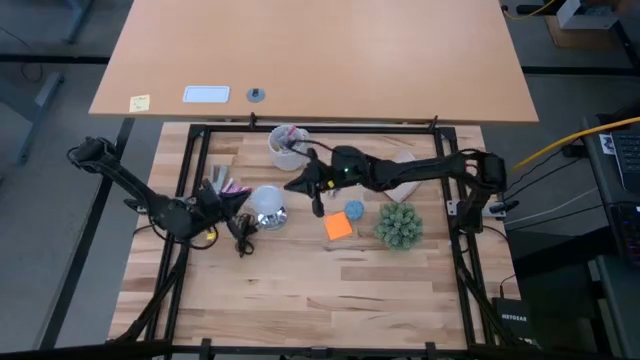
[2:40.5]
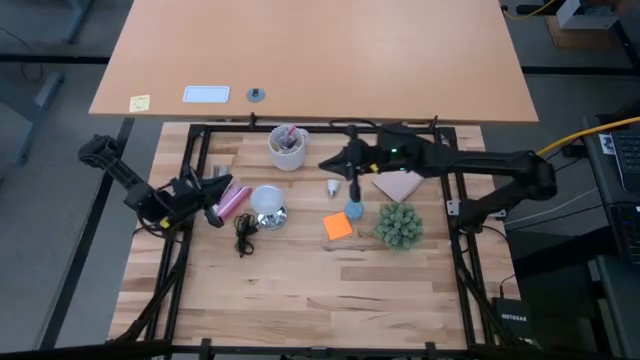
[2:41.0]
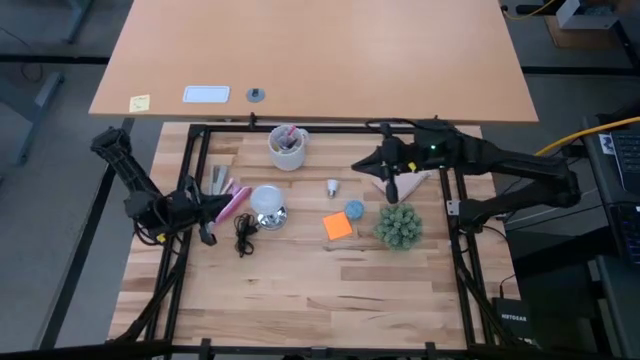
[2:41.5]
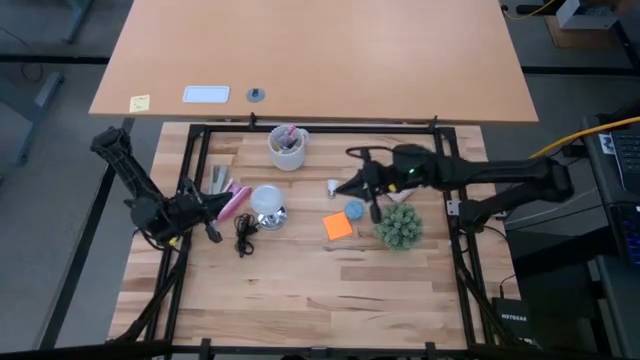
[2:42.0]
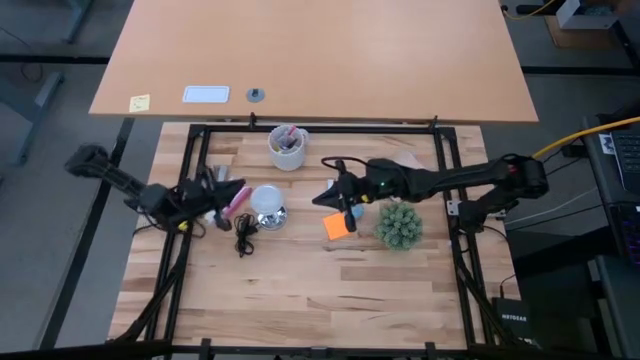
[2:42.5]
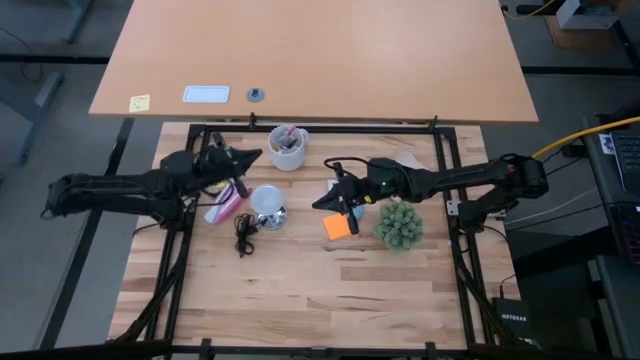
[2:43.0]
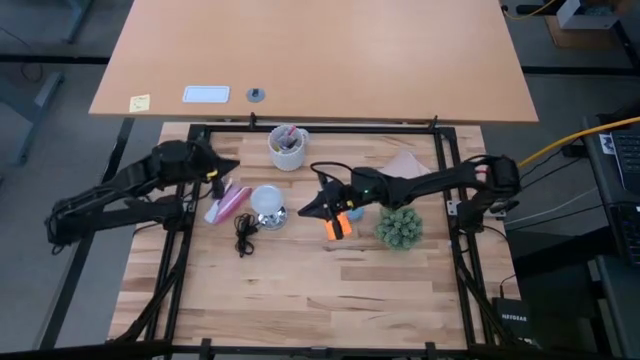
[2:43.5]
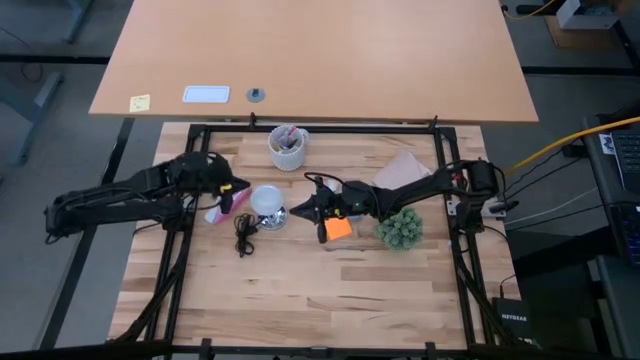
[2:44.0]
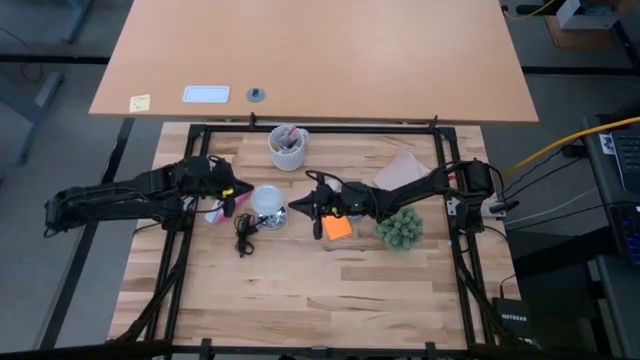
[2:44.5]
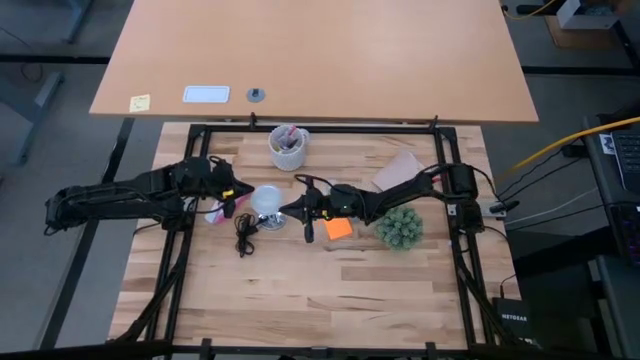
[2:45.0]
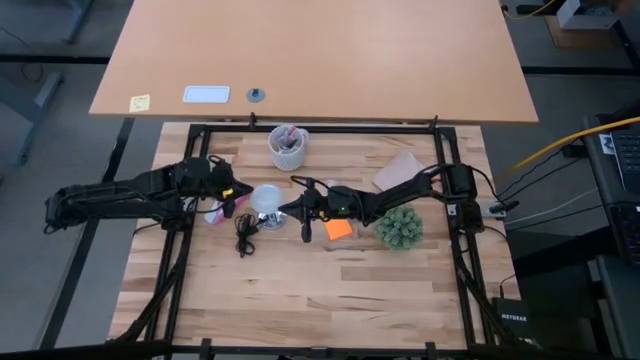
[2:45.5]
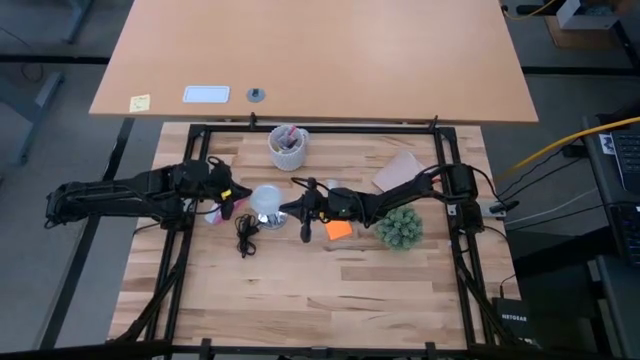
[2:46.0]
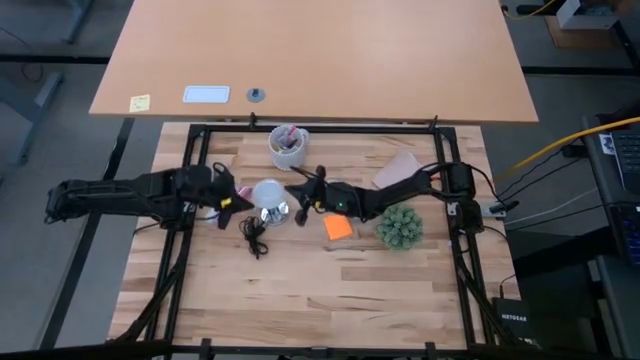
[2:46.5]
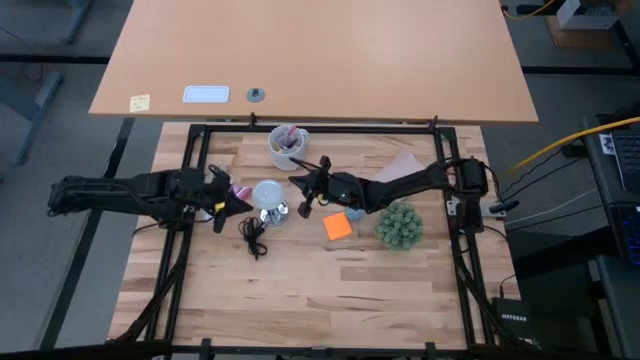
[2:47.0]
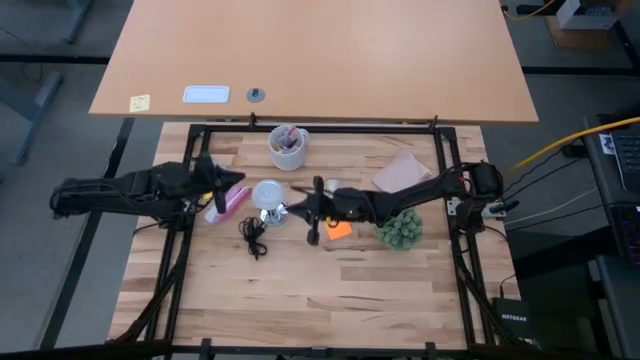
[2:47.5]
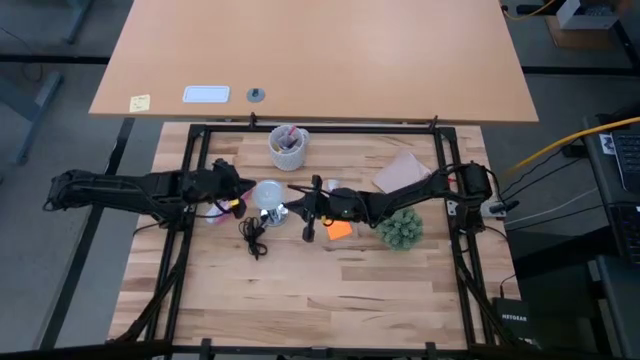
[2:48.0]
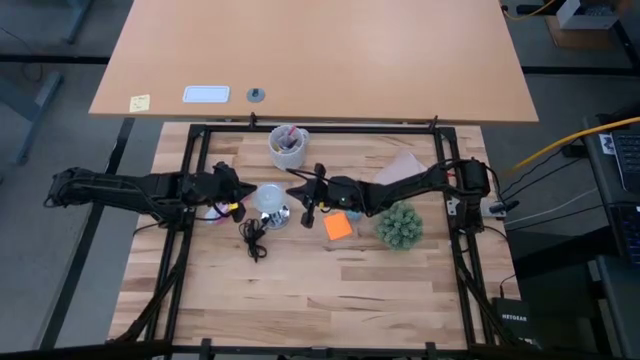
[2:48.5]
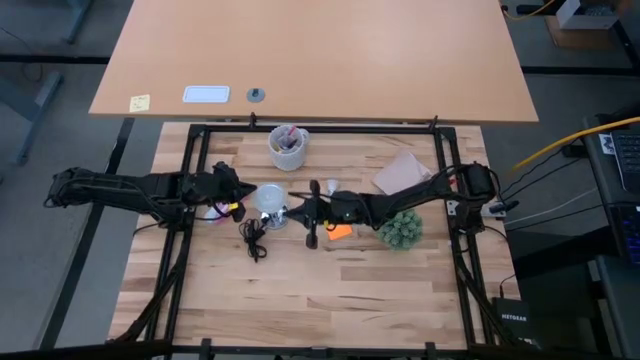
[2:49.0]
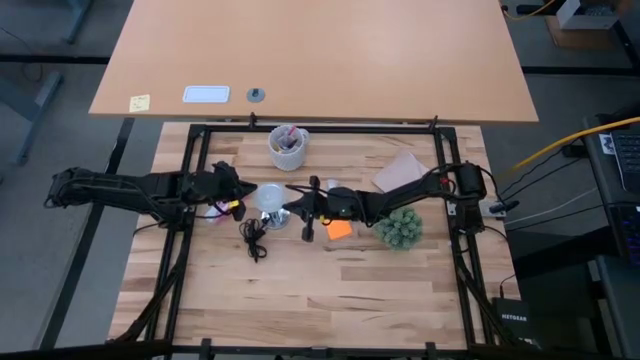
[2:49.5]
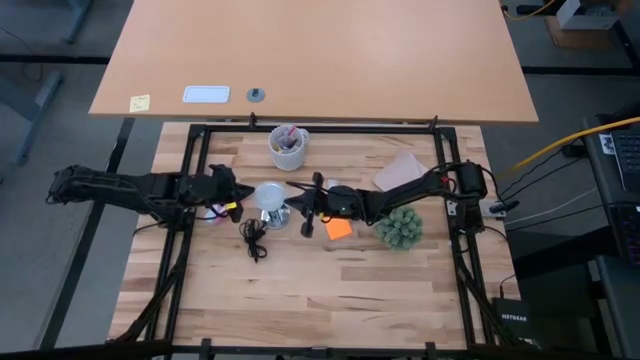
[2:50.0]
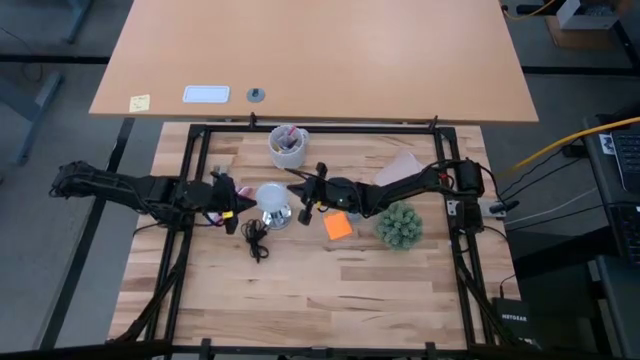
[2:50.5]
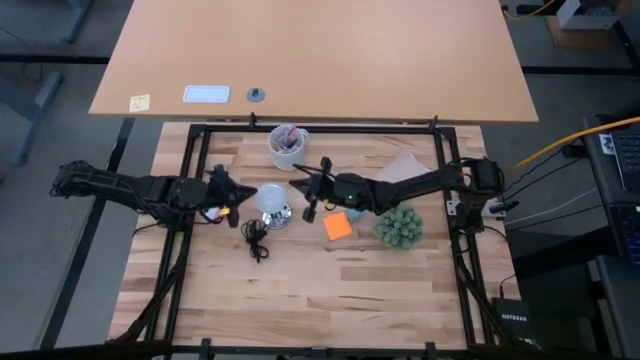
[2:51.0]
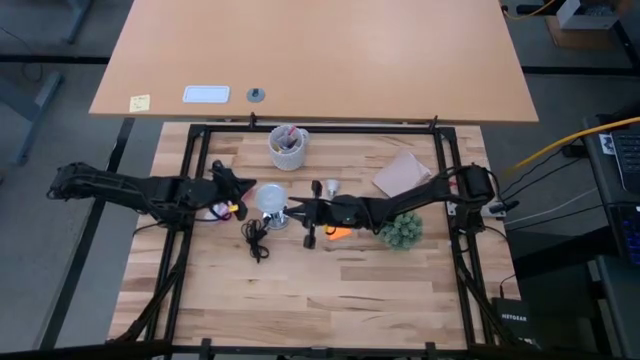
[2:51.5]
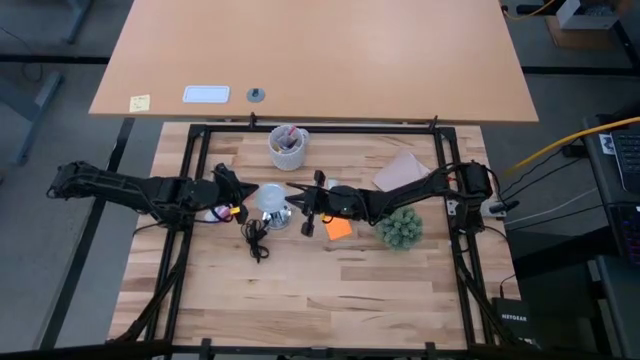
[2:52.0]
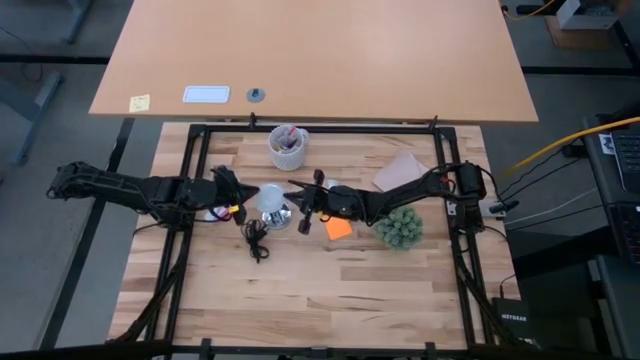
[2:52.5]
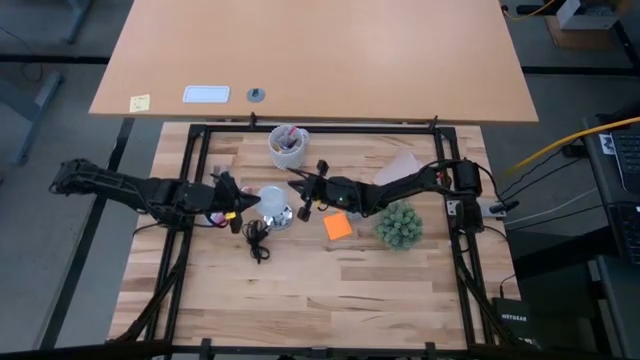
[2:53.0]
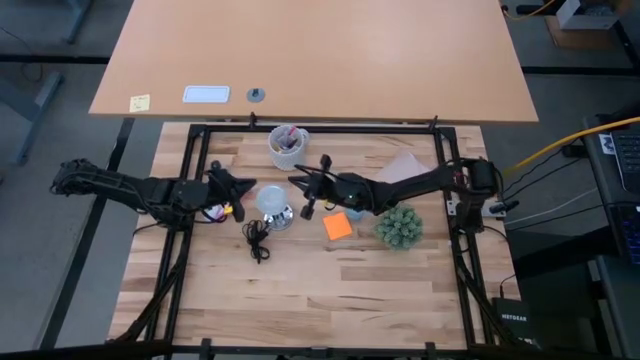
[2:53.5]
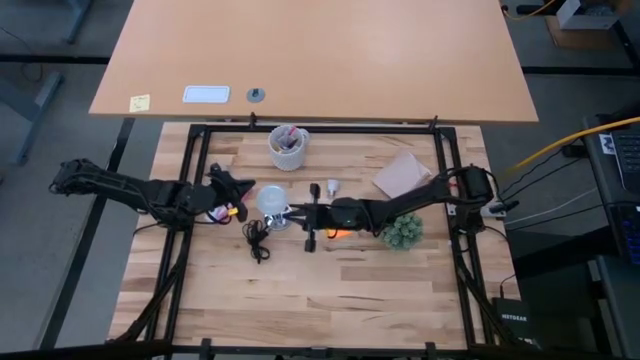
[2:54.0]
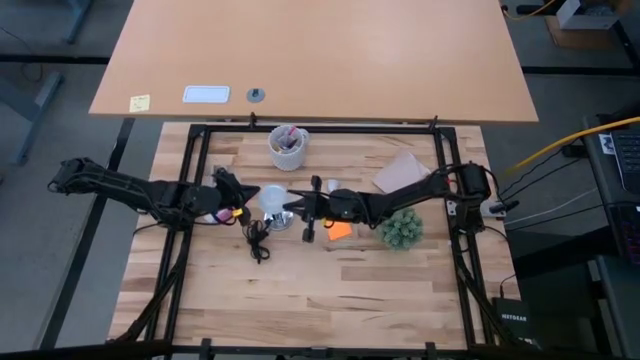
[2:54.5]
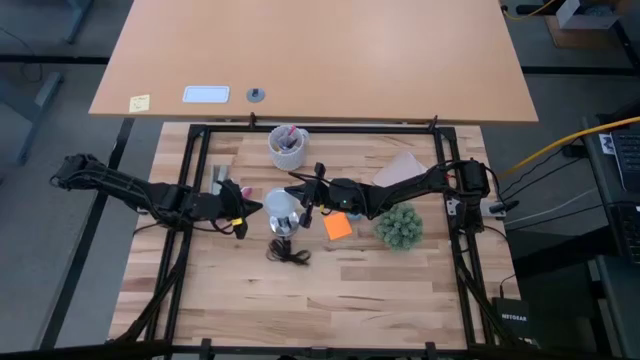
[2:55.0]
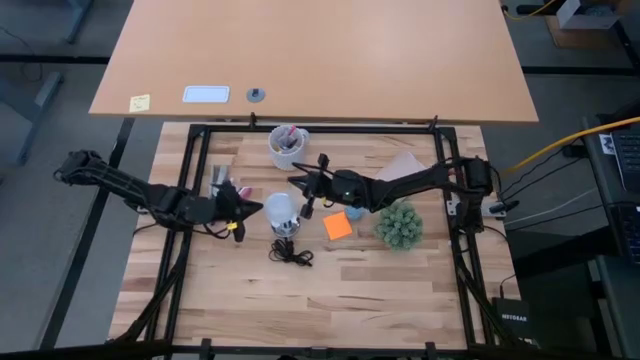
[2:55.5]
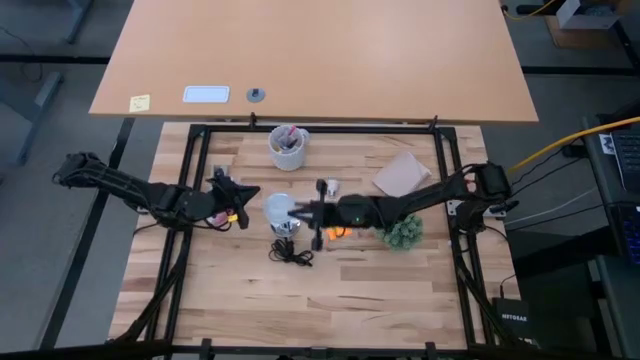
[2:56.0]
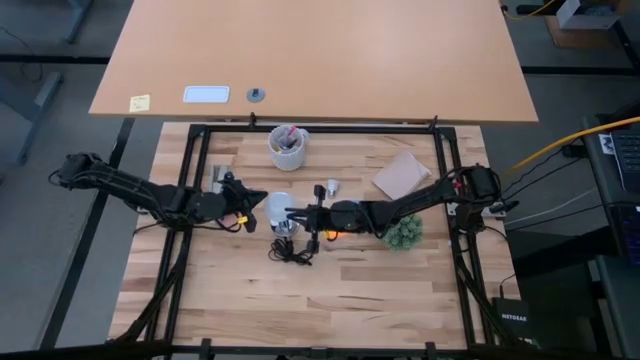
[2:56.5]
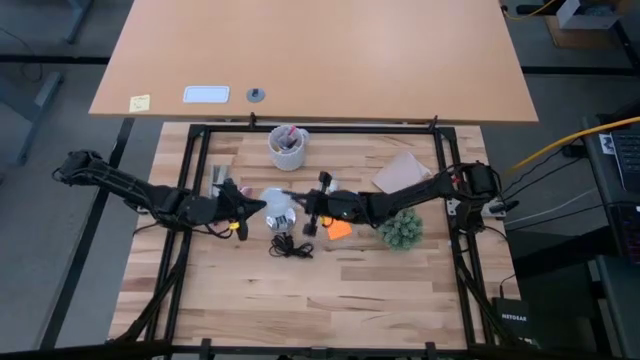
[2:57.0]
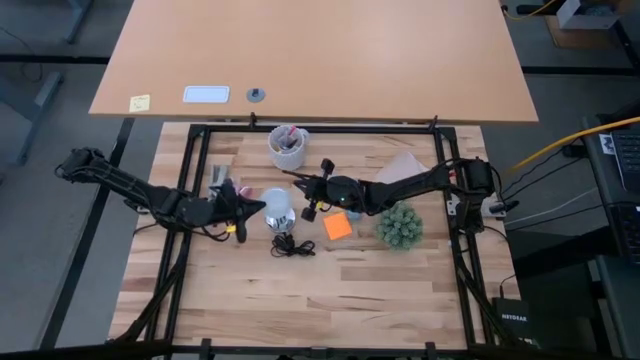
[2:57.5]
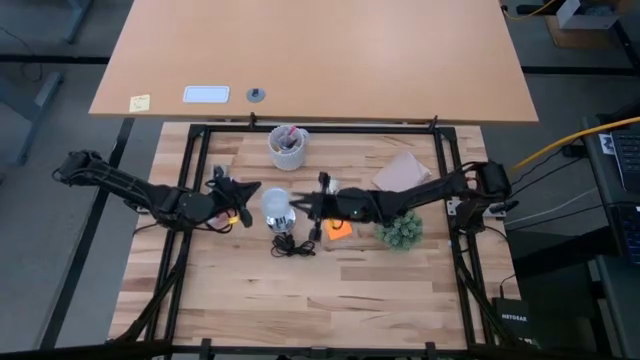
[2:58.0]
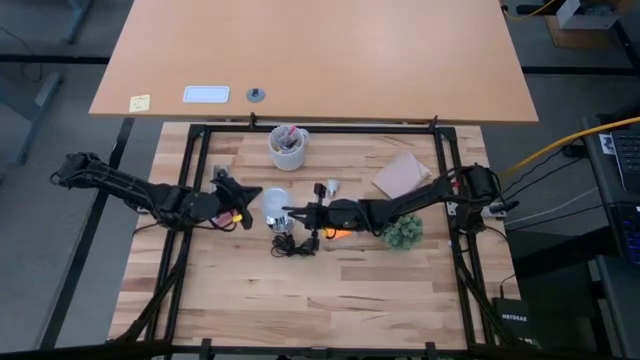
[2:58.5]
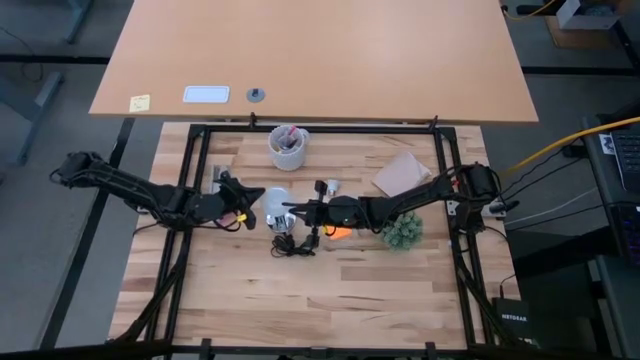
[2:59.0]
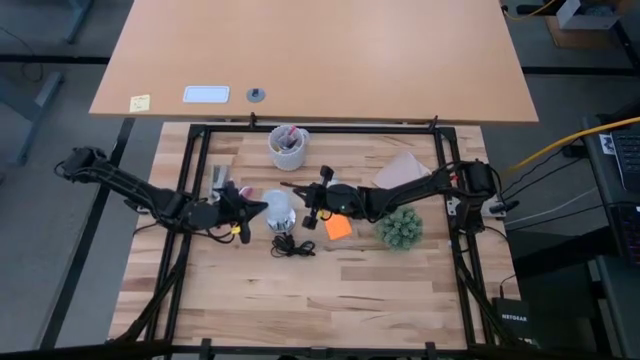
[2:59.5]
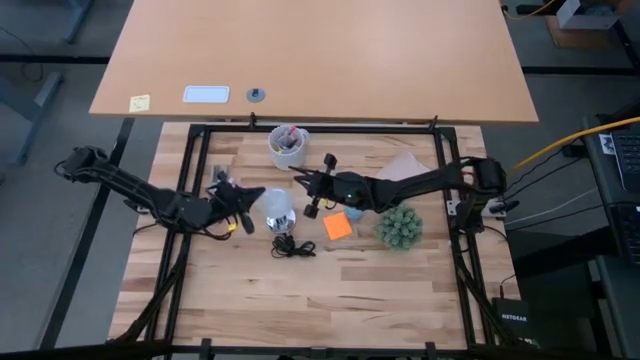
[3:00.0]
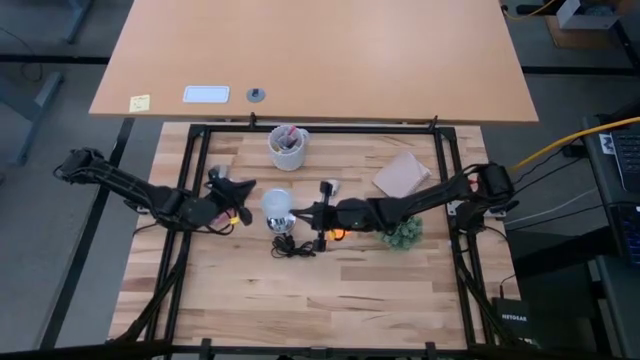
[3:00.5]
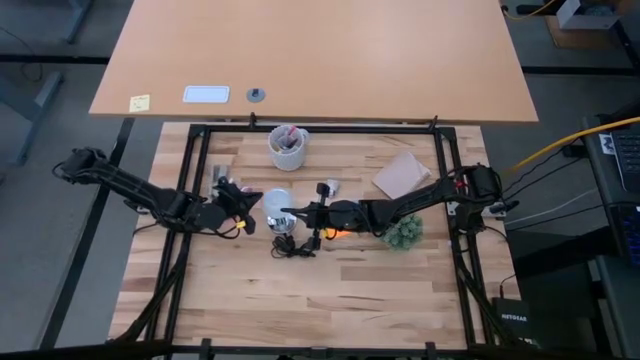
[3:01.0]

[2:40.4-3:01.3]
Task: Screw lightbulb
Remove the light bulb from the silver lamp
